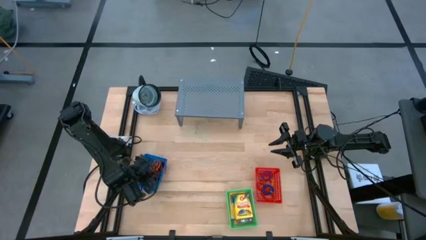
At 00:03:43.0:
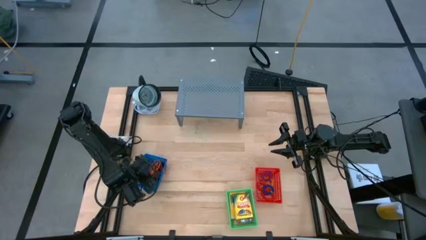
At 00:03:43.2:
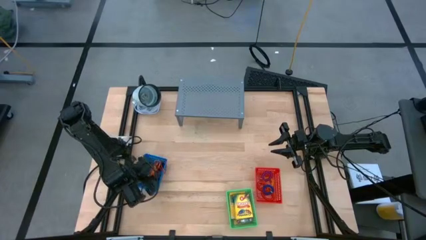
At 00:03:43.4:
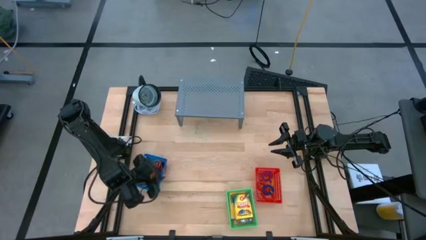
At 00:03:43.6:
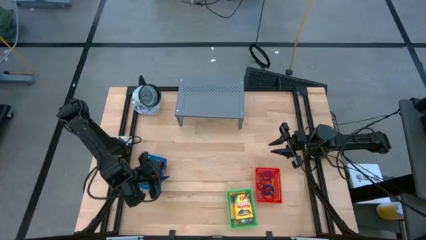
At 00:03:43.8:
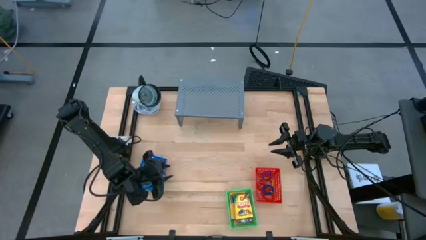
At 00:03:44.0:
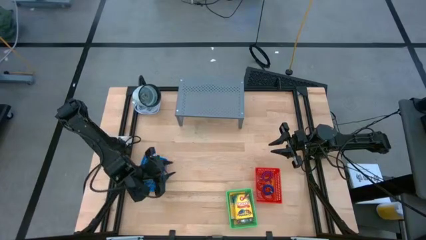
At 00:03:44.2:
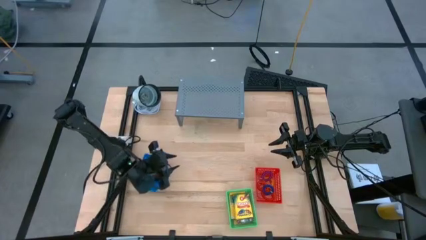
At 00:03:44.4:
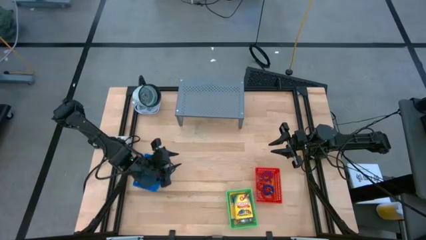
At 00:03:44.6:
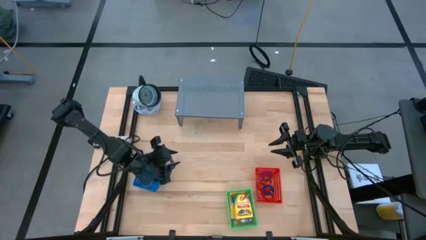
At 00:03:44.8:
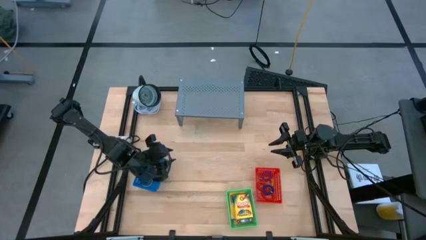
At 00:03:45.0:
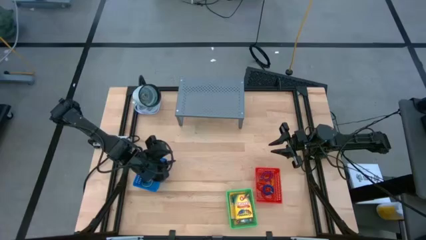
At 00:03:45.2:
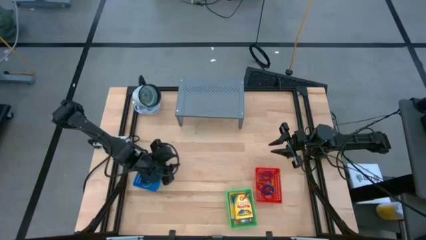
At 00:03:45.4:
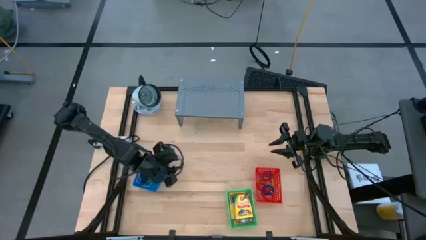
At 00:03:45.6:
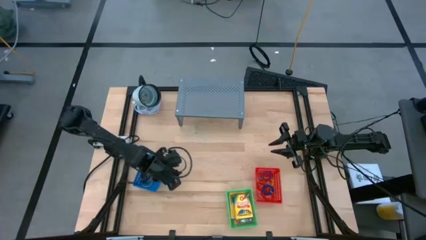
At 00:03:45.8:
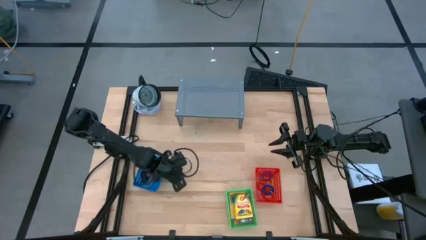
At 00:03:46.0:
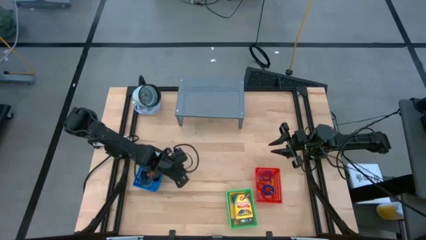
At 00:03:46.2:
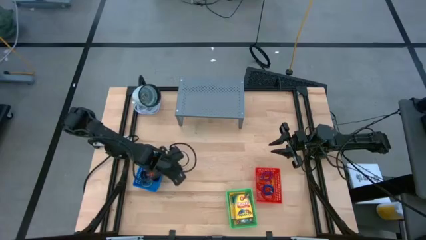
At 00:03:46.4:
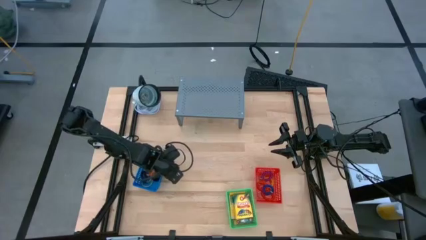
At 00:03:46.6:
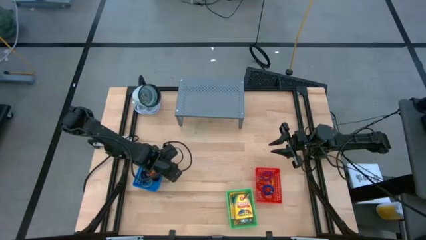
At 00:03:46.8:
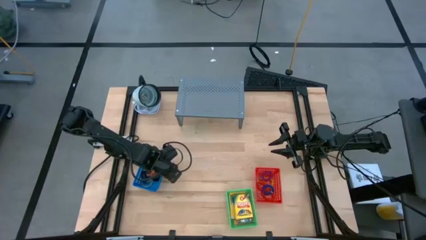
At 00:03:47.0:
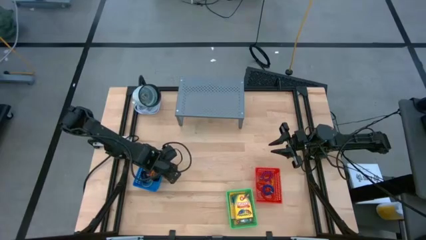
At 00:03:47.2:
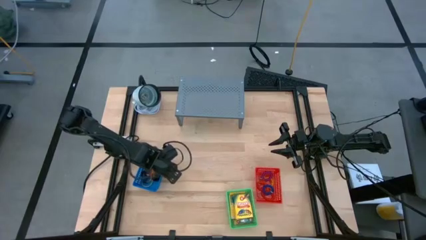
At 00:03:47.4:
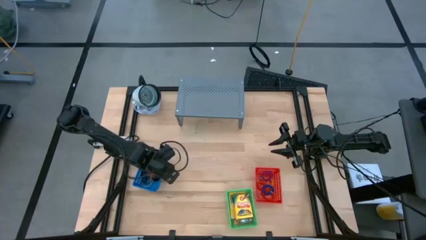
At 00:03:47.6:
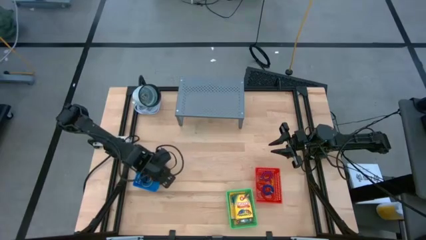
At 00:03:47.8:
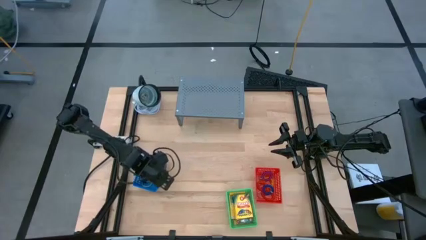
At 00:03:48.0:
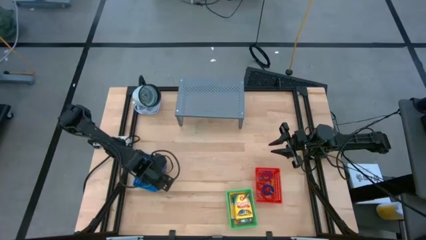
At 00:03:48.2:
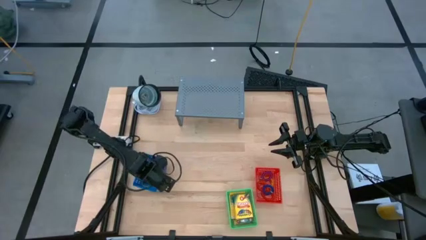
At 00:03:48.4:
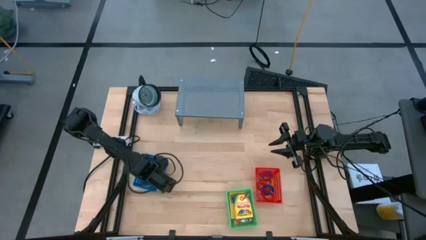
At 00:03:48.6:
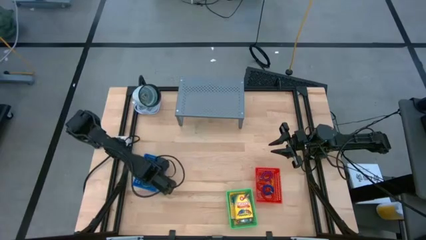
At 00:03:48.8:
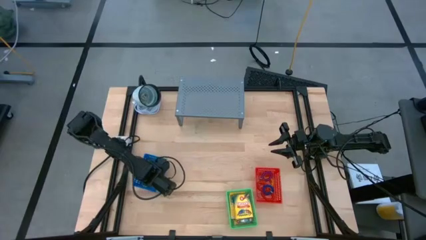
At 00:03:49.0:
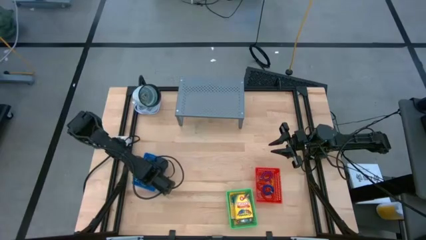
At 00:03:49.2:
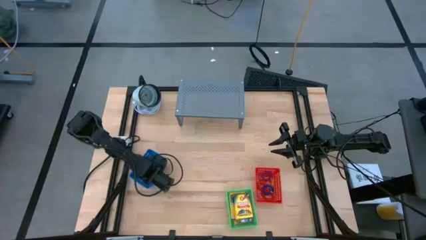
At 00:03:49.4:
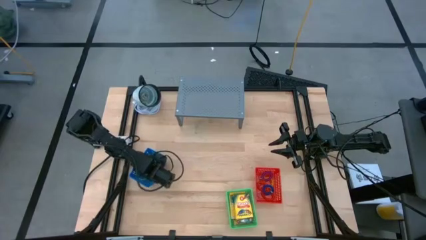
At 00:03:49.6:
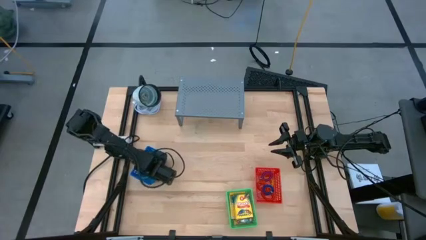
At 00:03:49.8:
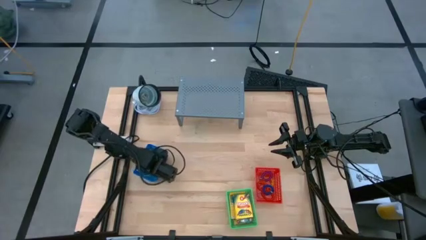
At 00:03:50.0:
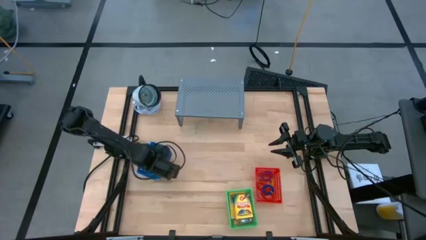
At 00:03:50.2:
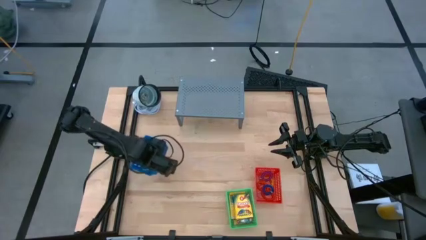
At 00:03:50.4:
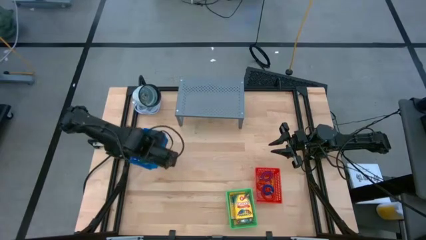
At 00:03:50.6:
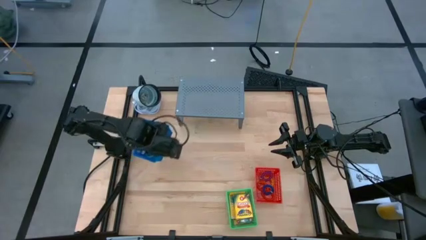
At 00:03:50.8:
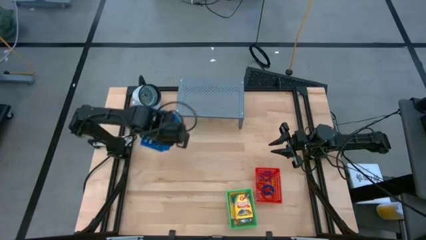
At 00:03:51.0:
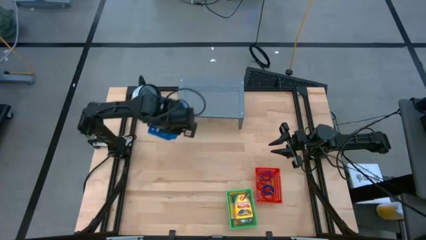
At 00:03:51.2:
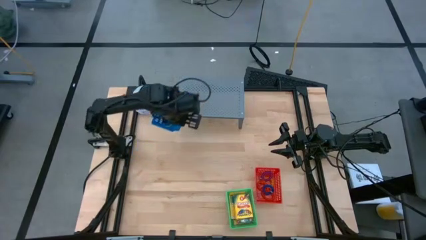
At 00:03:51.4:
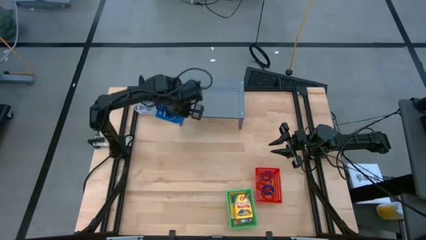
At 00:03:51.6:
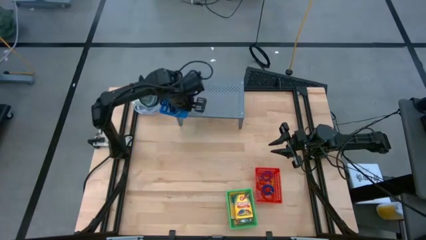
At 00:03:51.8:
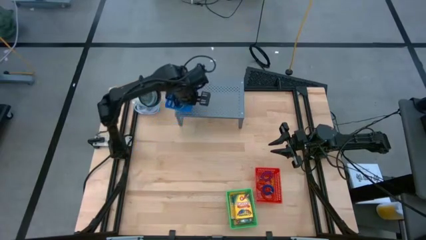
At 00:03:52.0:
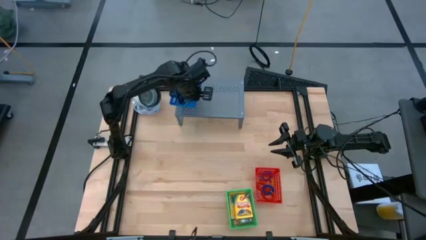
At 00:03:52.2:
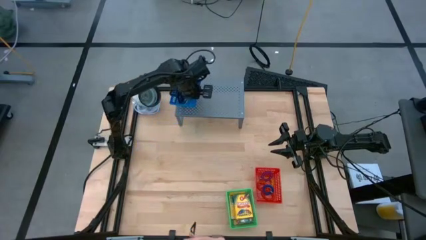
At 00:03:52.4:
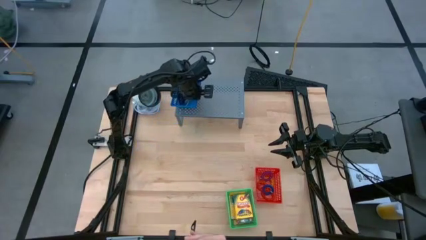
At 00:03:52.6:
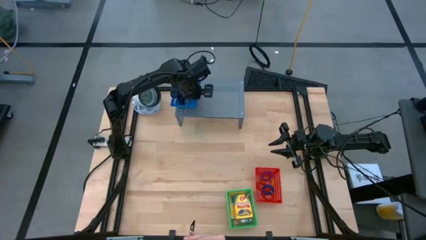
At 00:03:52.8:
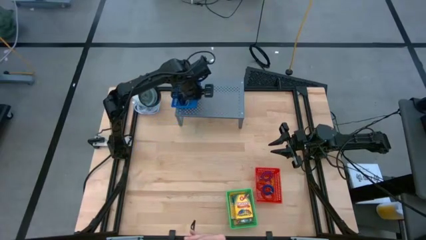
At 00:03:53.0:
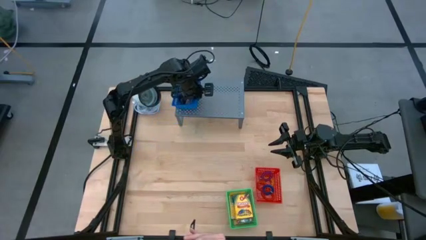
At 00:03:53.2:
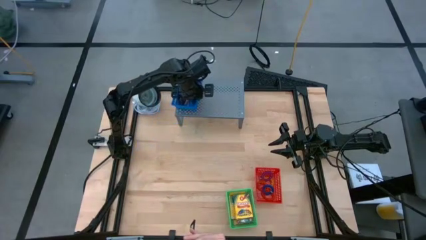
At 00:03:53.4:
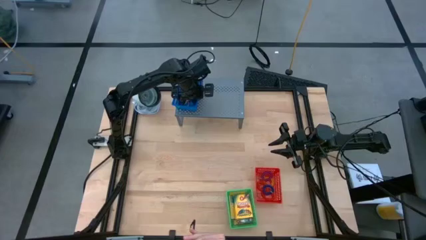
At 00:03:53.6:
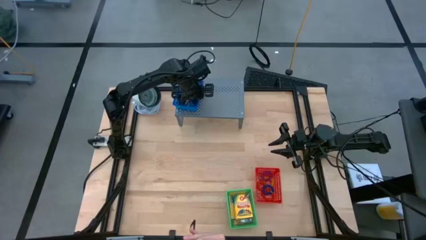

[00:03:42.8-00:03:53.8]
Task: Pick & Place Office Desk Supplies
Put the blue bin on the shelf
